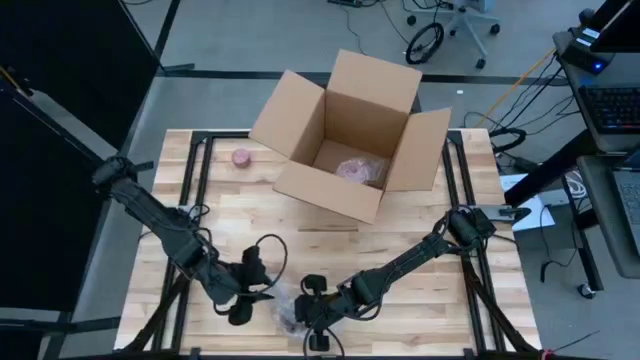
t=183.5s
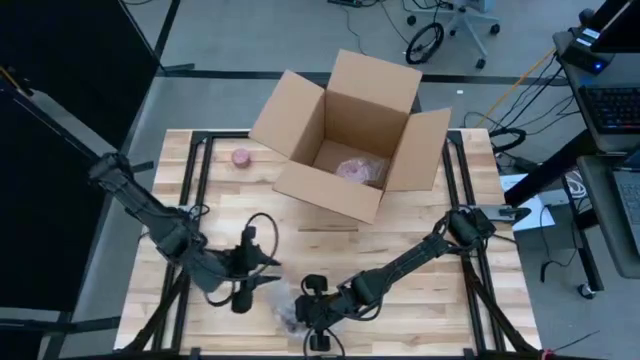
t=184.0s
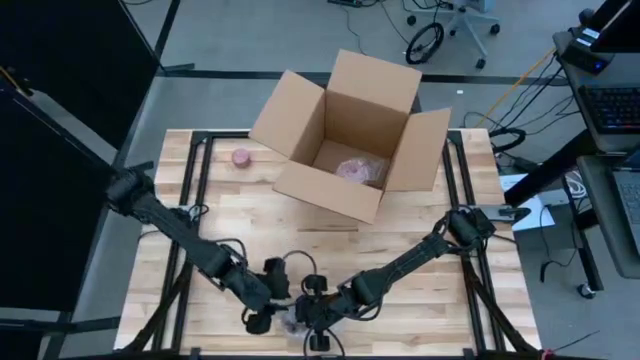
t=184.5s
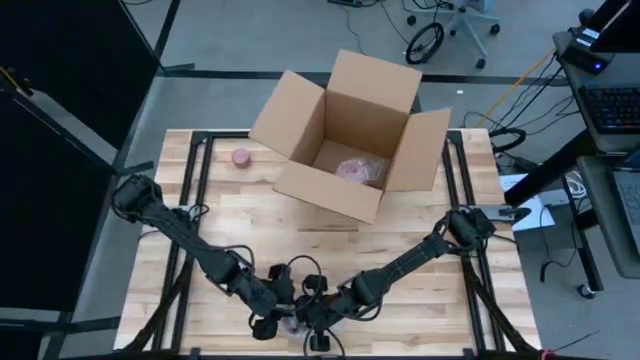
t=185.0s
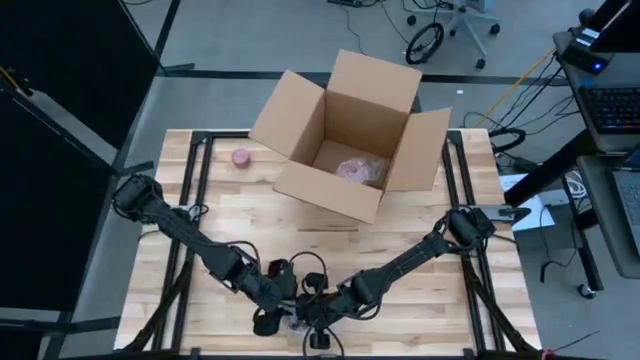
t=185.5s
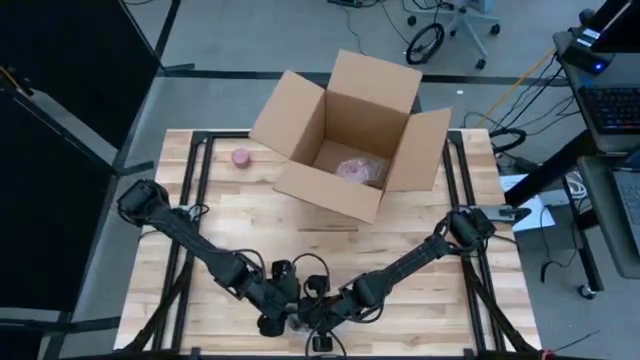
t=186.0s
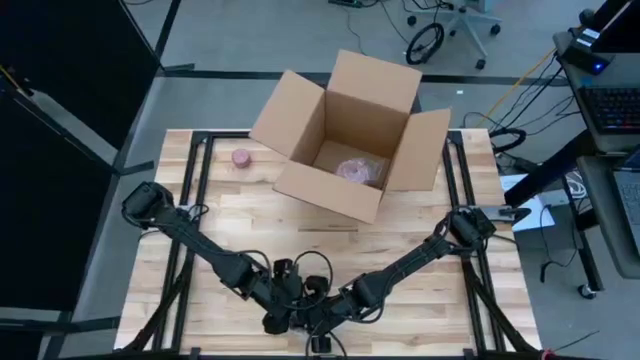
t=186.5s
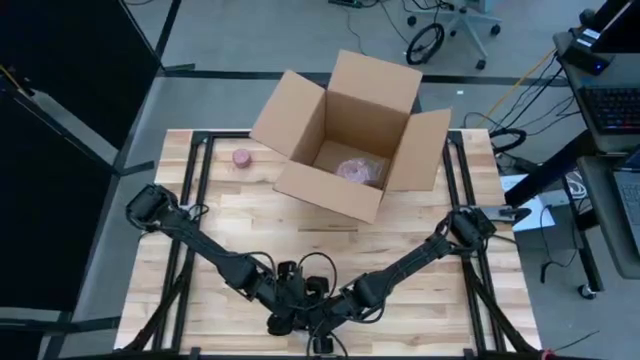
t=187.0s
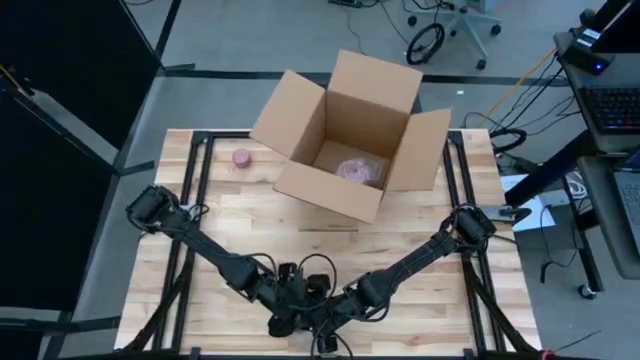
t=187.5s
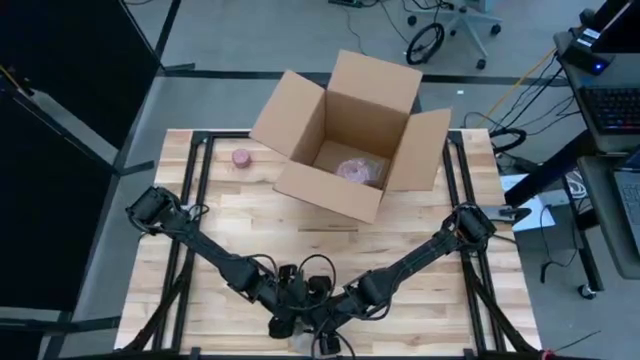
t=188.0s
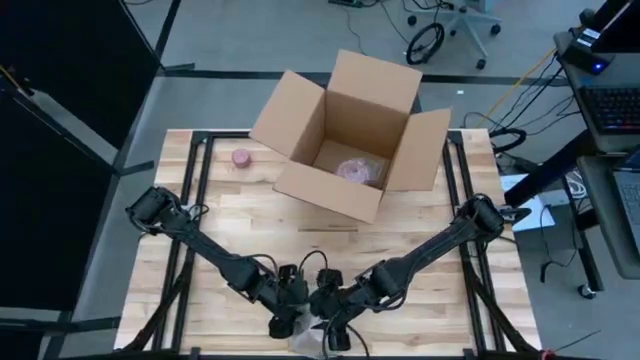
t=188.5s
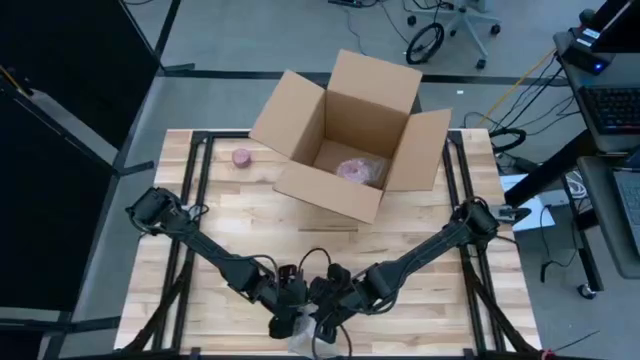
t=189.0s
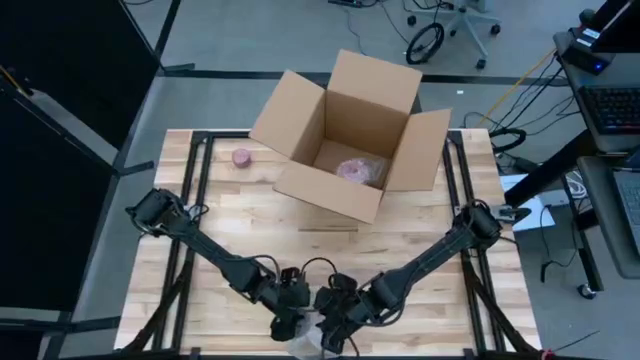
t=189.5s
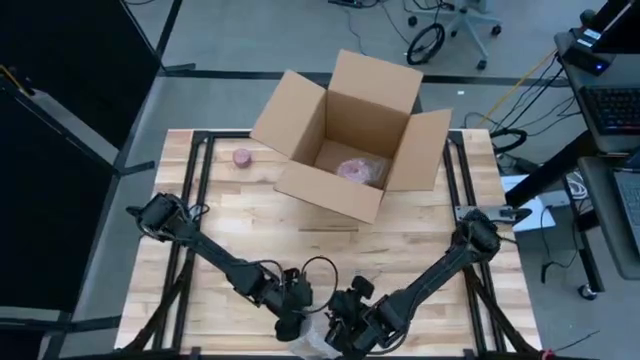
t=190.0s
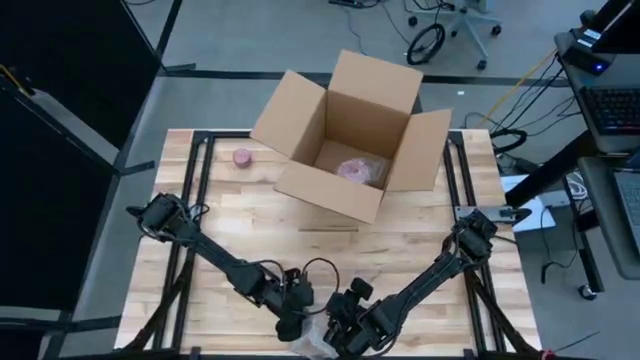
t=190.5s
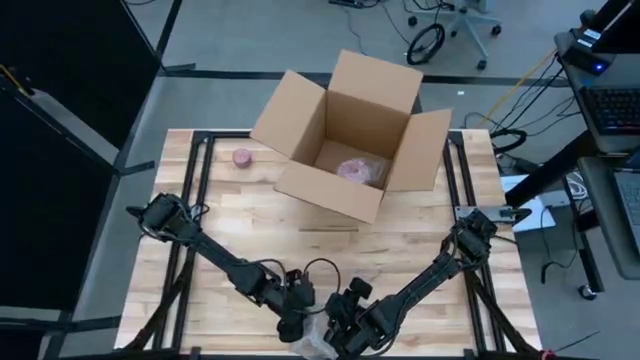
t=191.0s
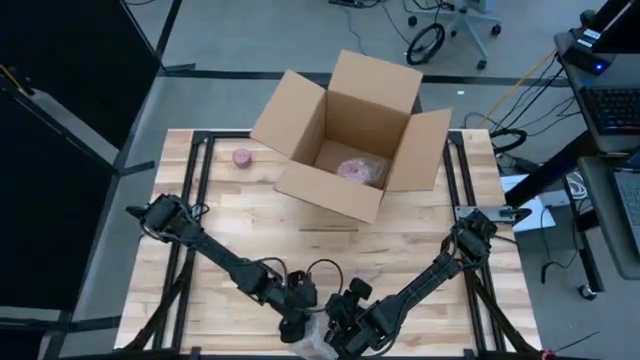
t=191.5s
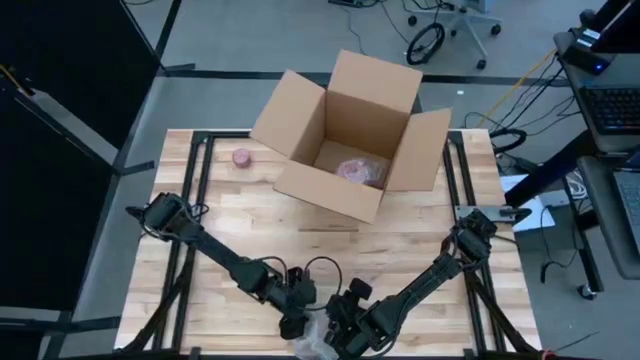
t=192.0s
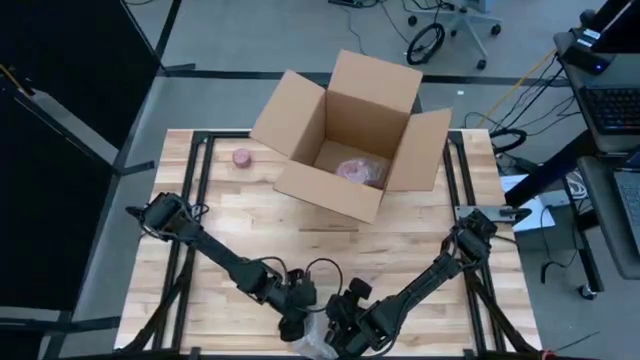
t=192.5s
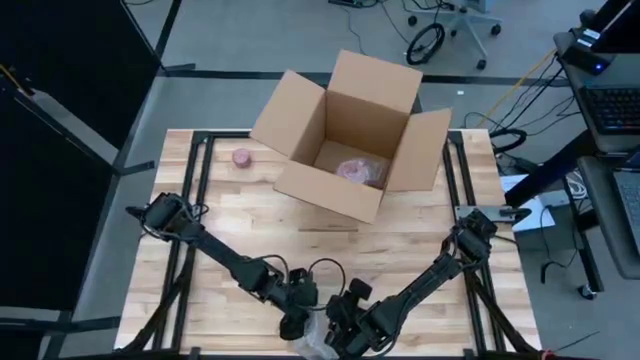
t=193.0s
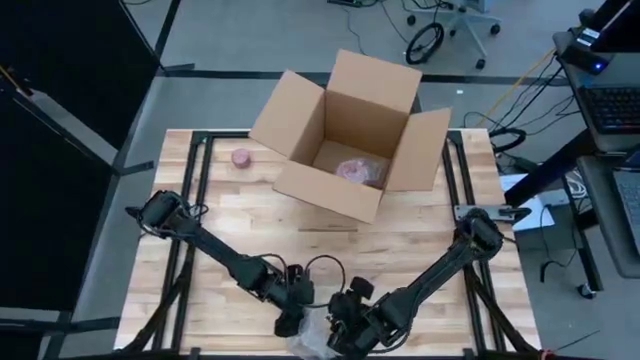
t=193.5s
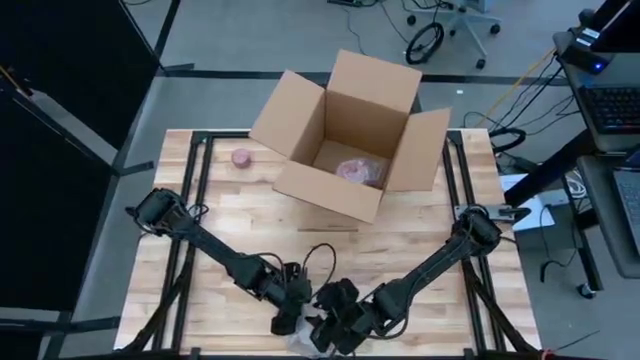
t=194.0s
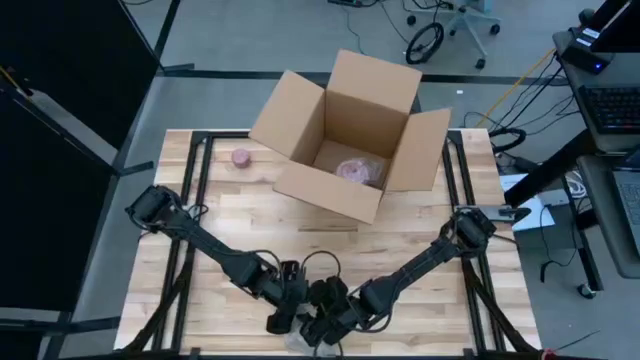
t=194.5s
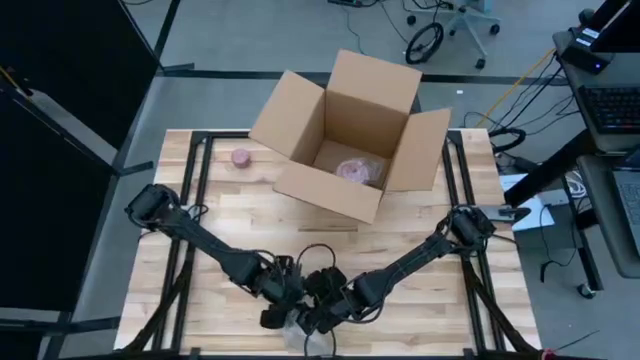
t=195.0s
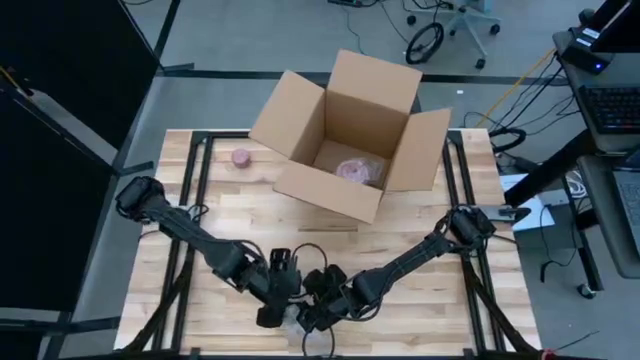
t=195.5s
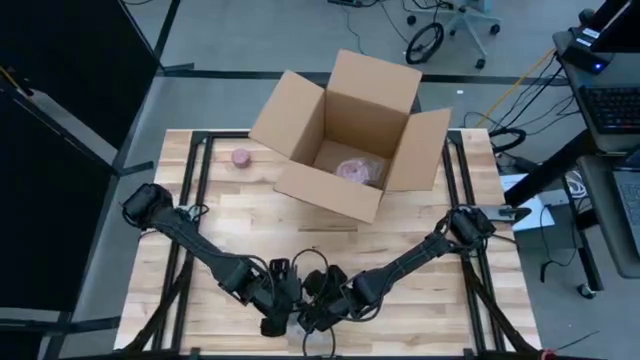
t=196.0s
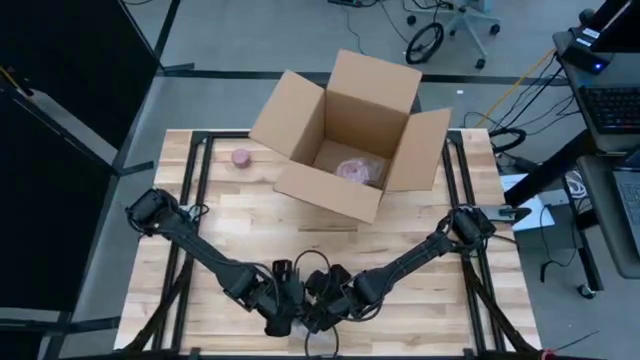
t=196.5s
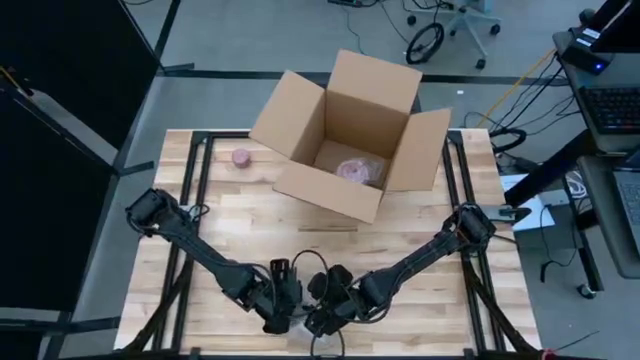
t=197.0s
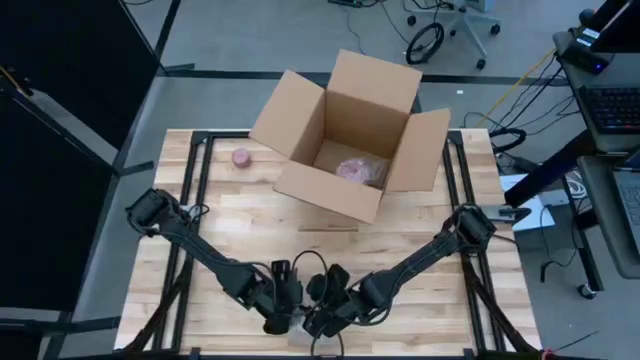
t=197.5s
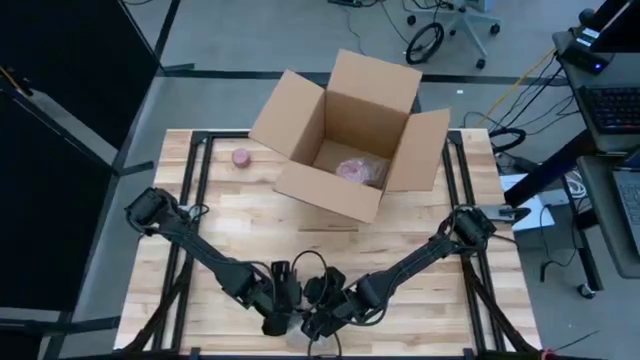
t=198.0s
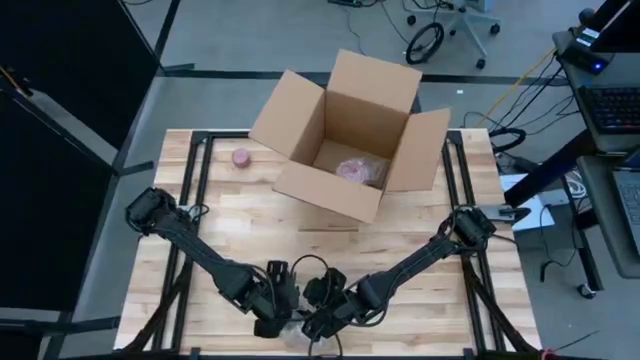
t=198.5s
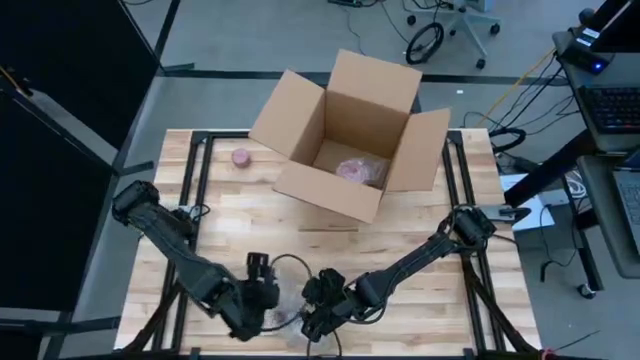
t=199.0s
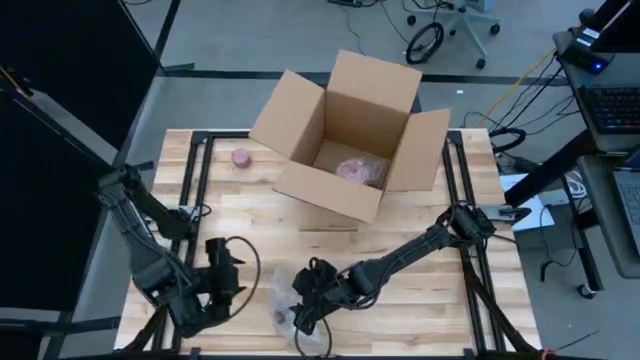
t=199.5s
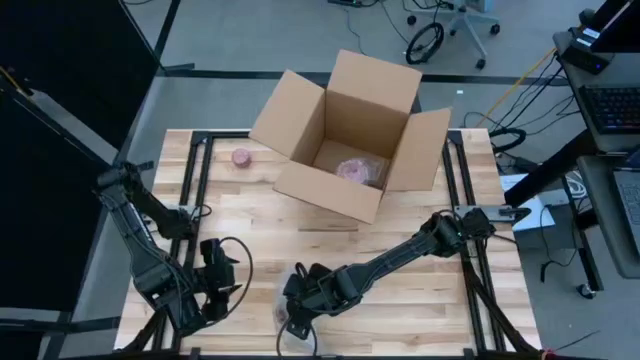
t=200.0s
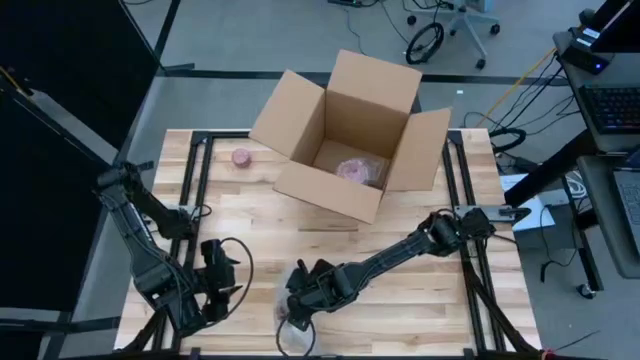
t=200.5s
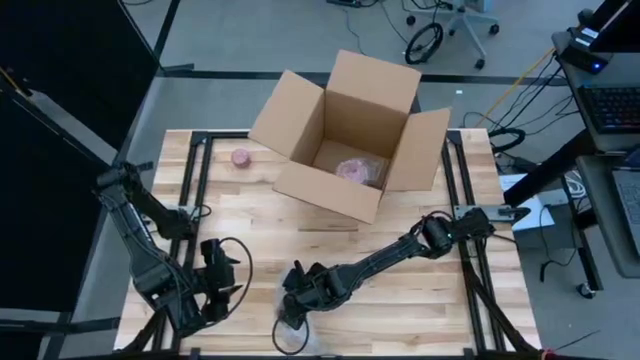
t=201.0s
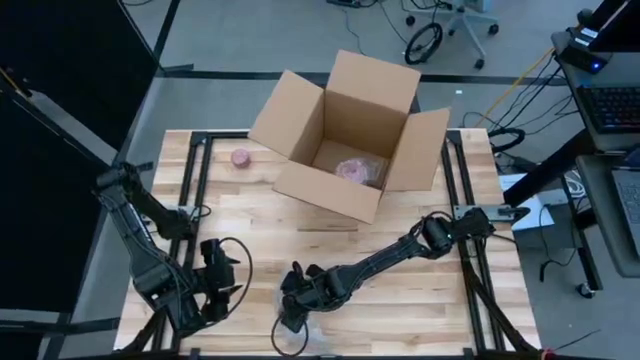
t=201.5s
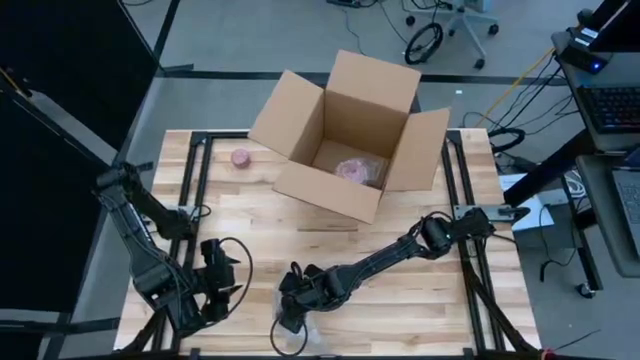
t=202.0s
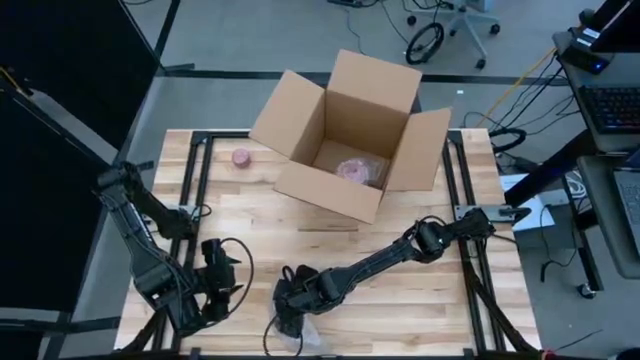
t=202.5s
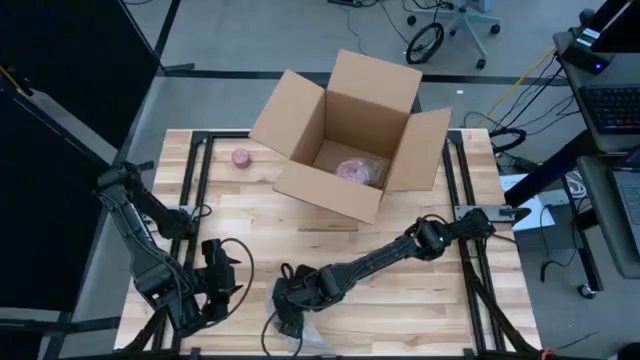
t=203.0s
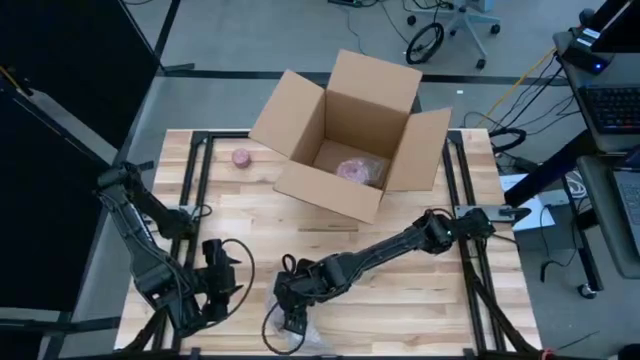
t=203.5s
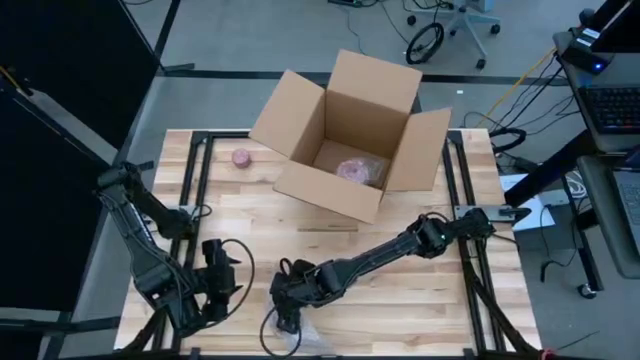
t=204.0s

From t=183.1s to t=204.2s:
Task: wrap mug
Wrap the yellow mug in the bubble wrap
